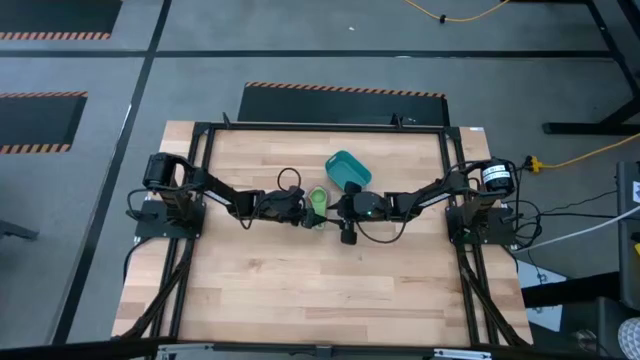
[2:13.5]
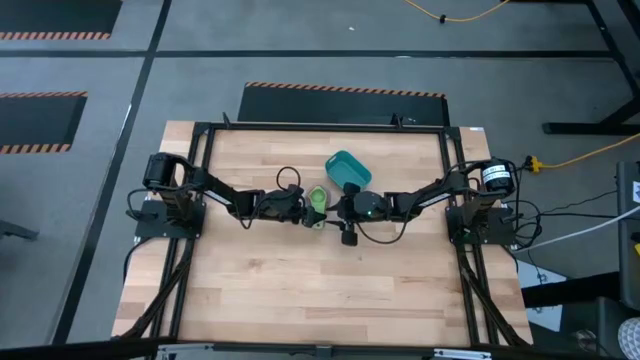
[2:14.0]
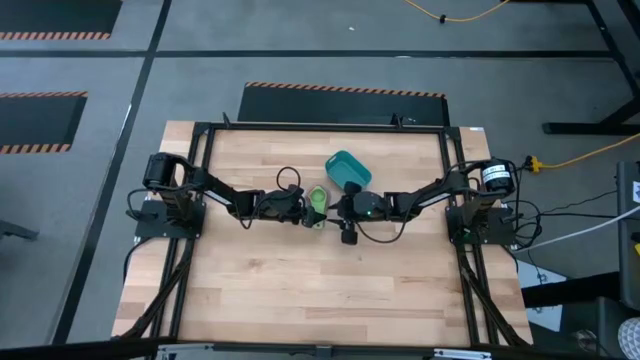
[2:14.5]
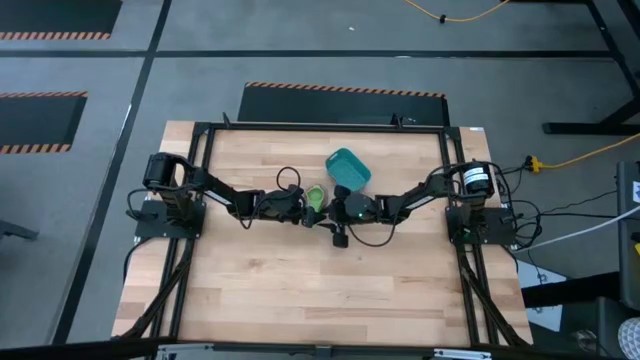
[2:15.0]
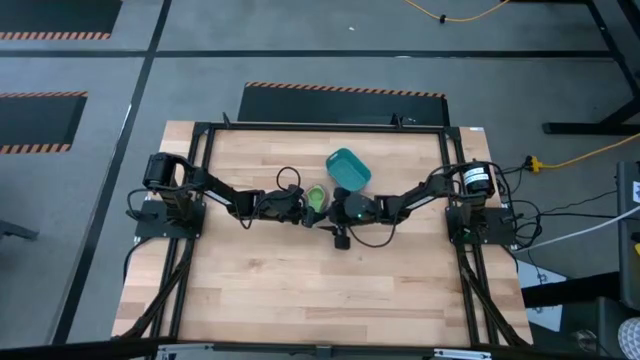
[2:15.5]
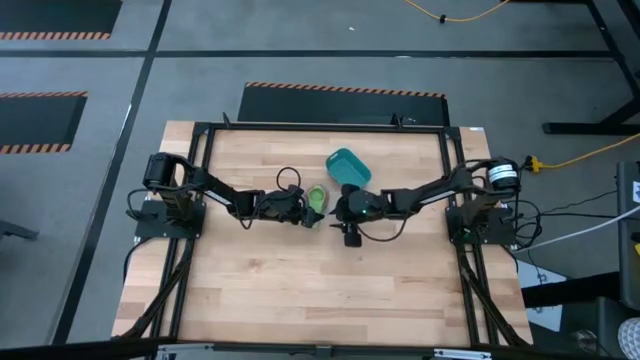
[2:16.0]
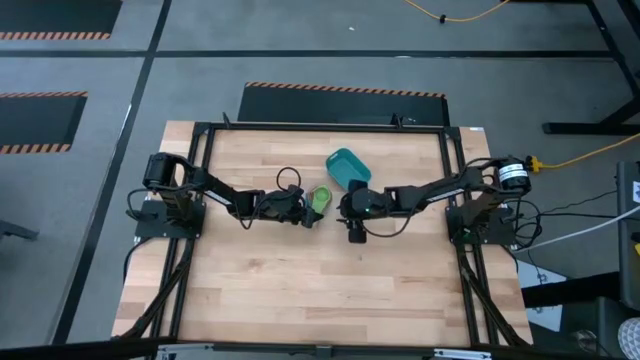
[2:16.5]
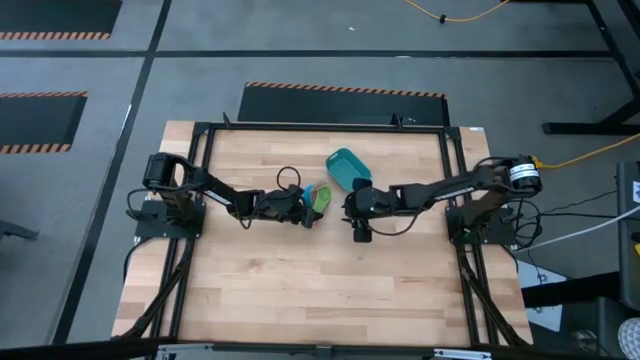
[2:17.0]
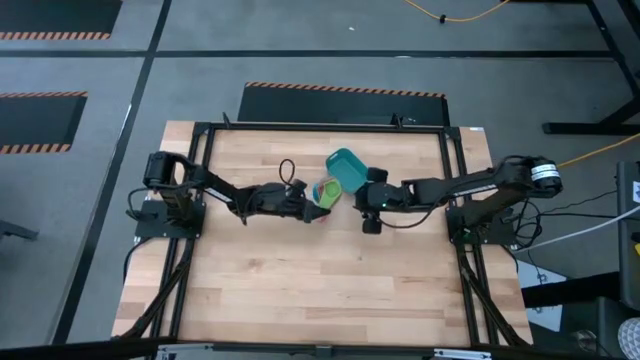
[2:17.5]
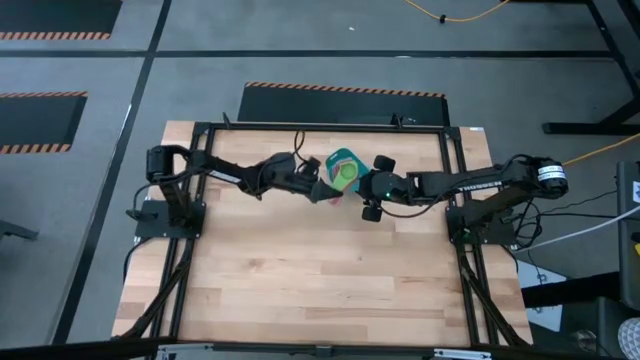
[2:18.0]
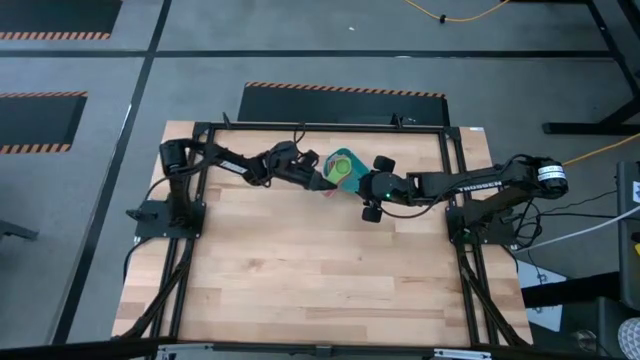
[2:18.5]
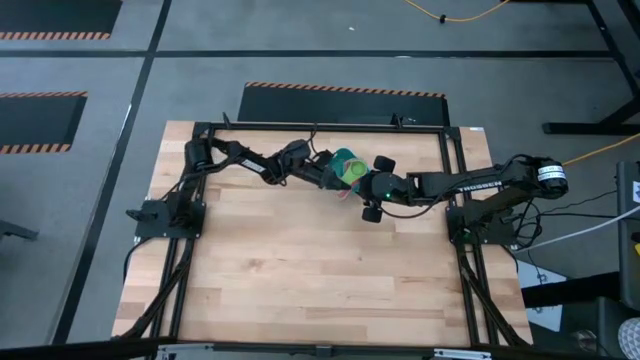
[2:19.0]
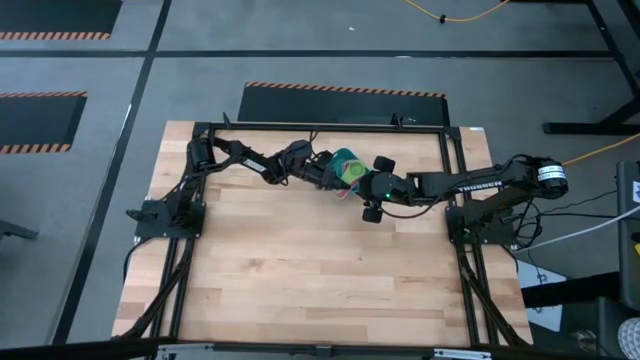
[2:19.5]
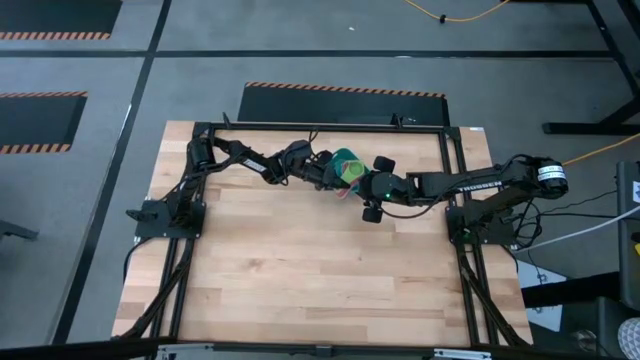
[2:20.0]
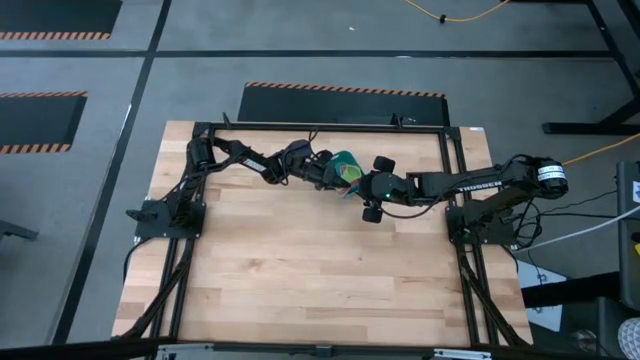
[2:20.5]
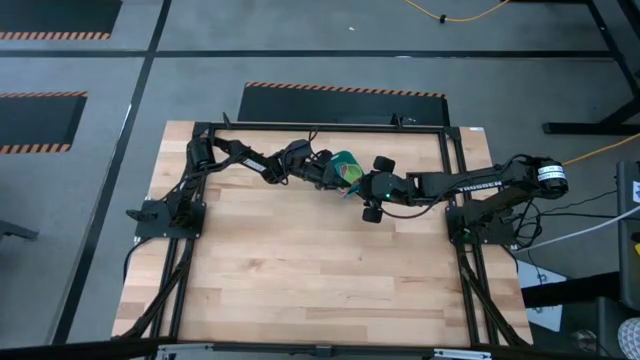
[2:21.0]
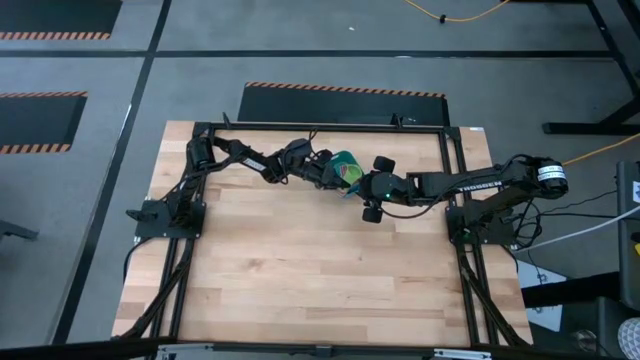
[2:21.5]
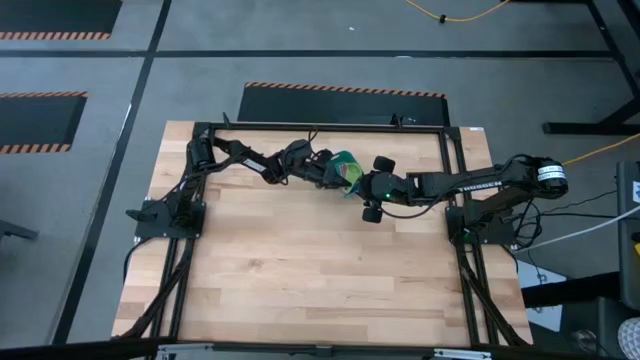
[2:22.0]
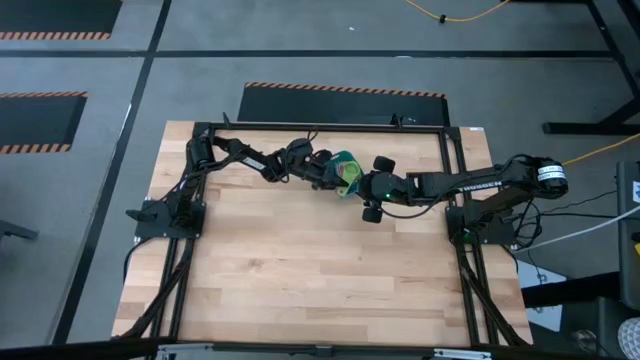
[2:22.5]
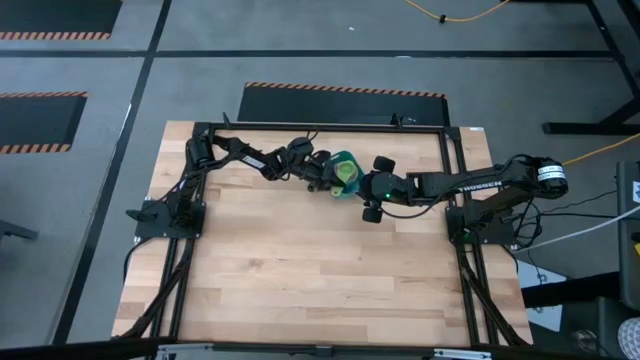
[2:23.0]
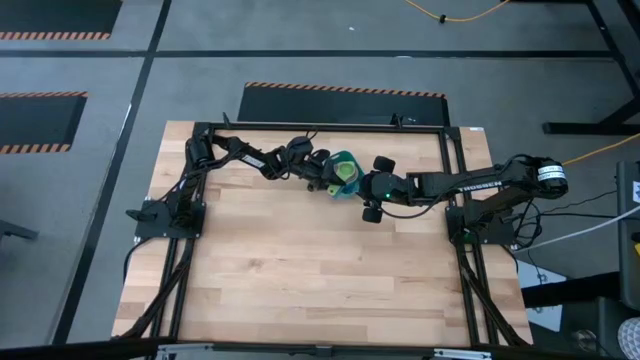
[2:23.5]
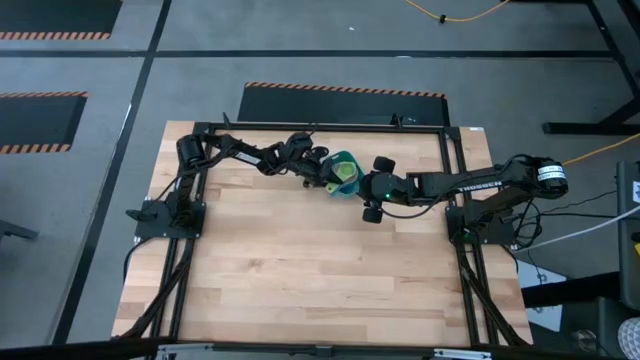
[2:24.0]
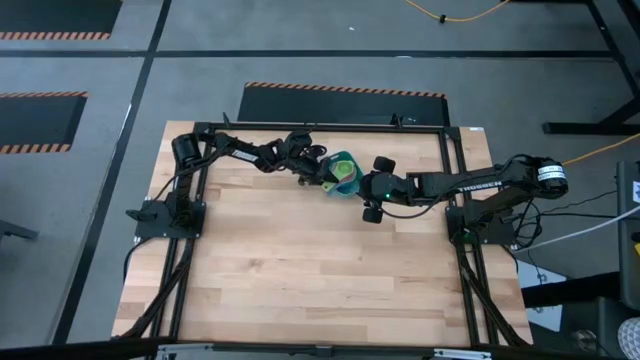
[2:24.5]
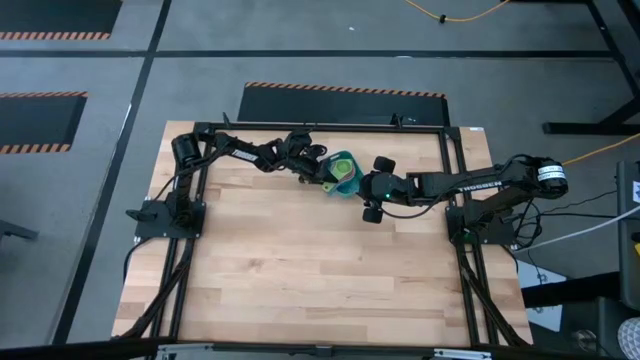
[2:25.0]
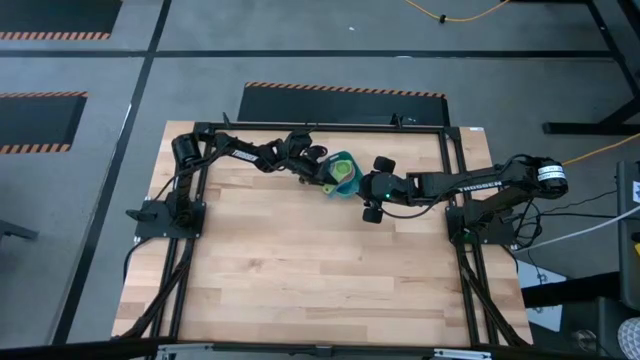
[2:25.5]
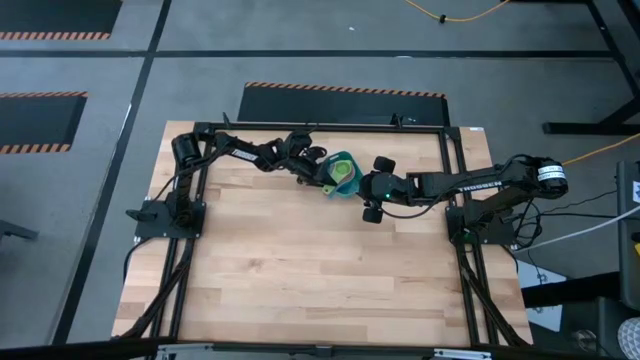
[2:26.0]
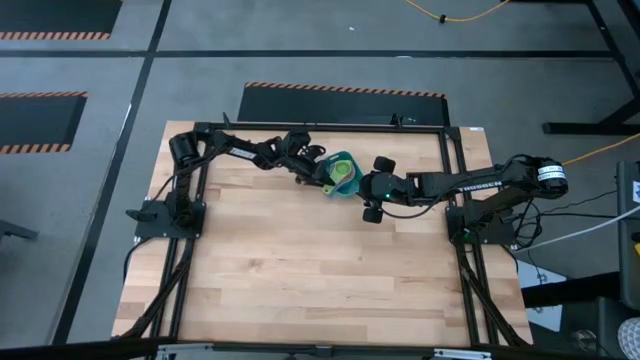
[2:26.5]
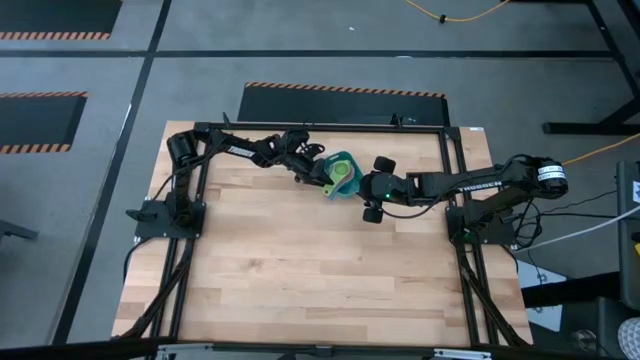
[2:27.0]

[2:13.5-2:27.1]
Task: Nest measuring cups in basket
Put the nested measuring cups into the green bin

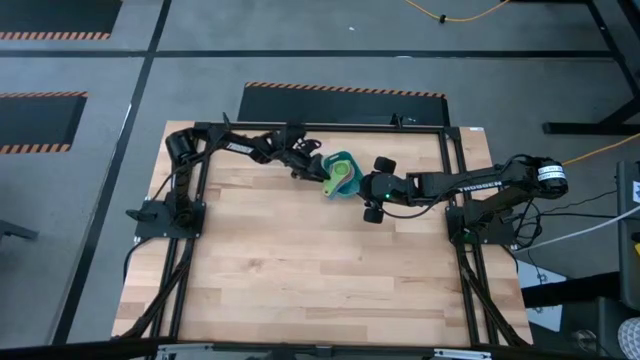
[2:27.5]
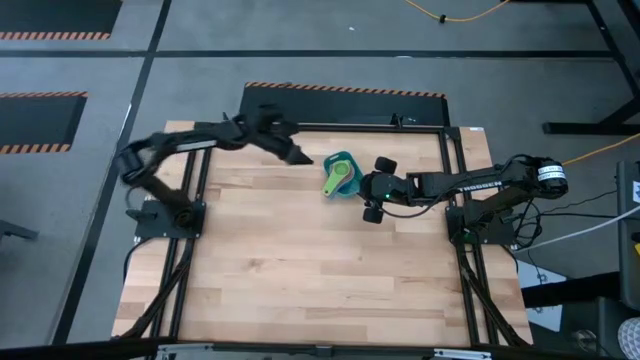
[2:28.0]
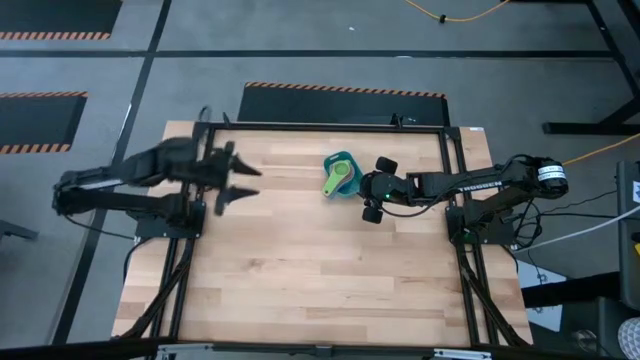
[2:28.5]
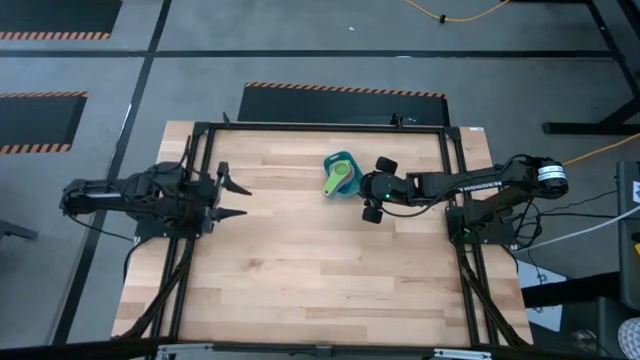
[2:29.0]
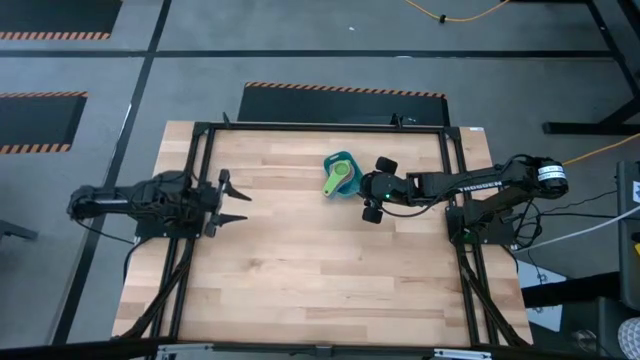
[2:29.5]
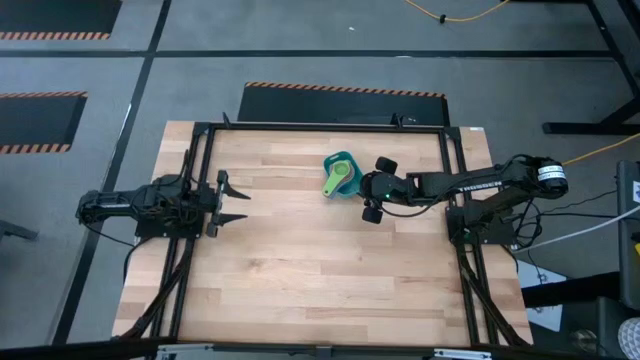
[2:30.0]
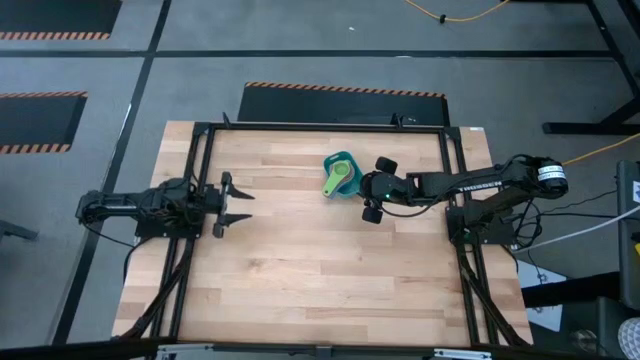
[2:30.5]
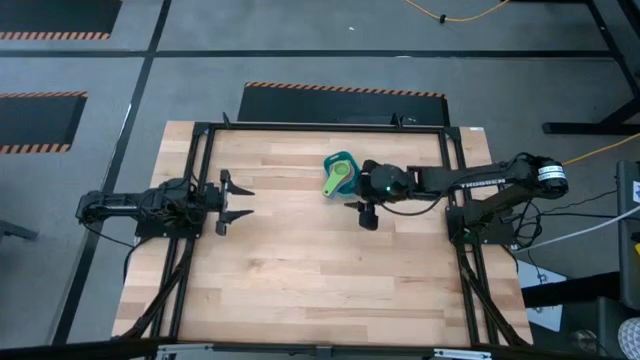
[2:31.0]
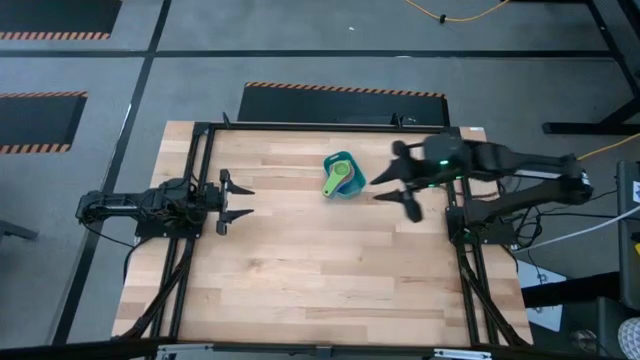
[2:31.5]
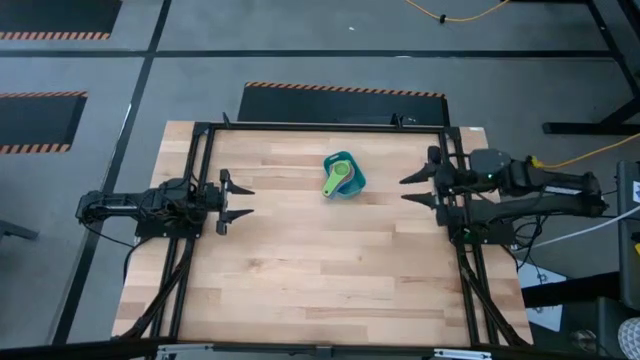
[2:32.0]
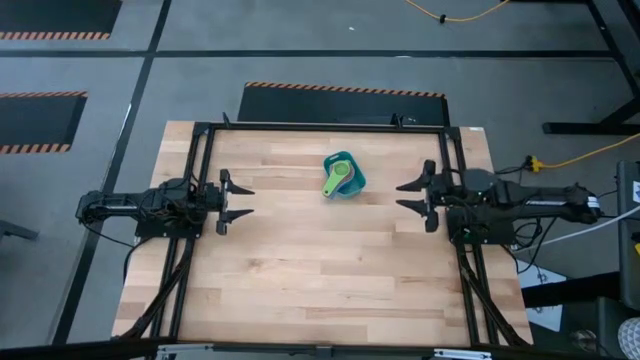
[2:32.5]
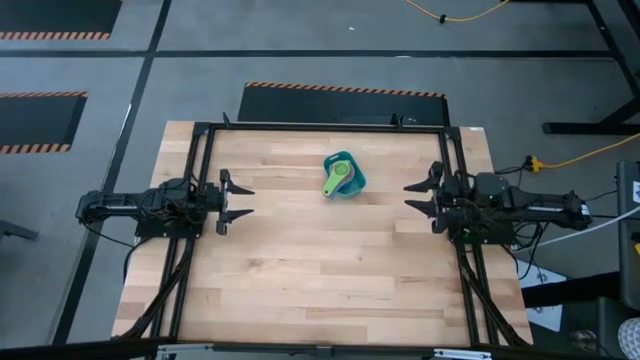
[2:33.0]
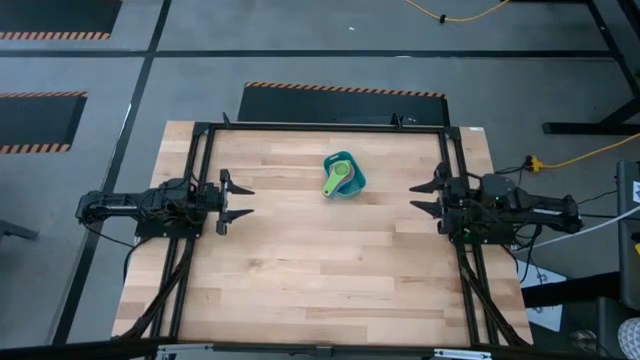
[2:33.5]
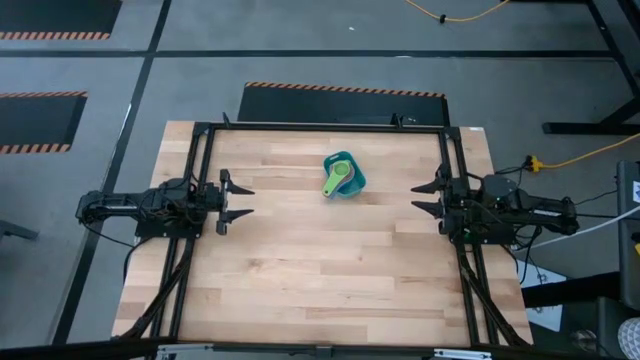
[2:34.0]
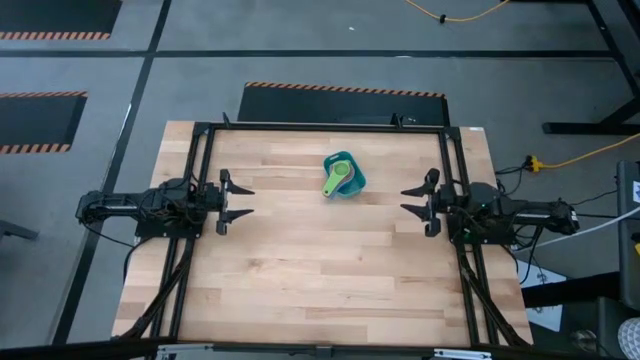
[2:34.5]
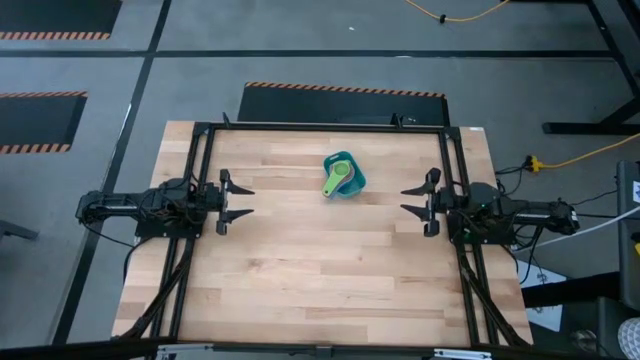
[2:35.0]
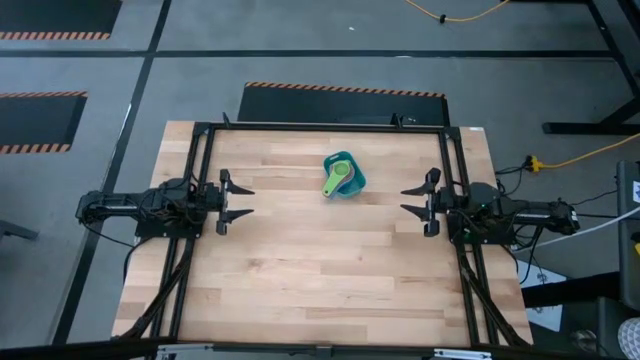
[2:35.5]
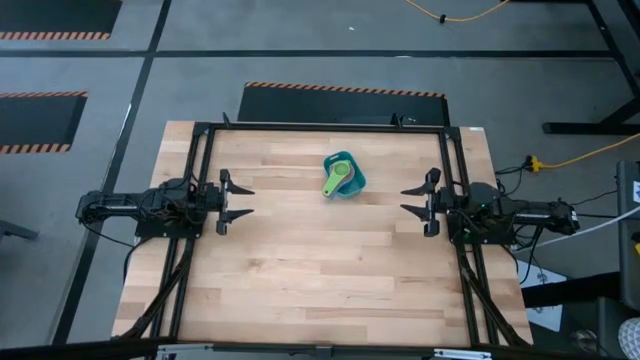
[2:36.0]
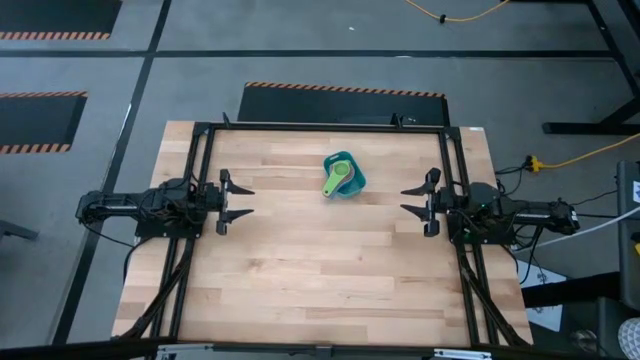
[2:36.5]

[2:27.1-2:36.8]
Return to Home Position
